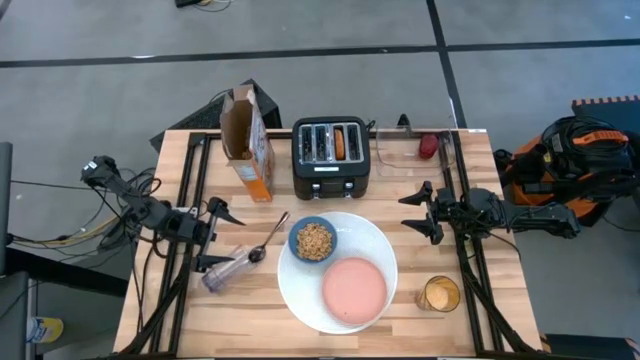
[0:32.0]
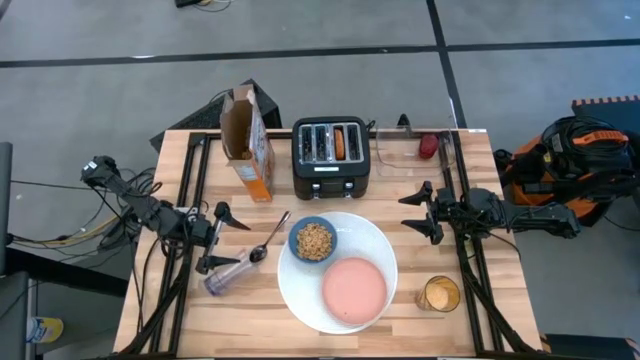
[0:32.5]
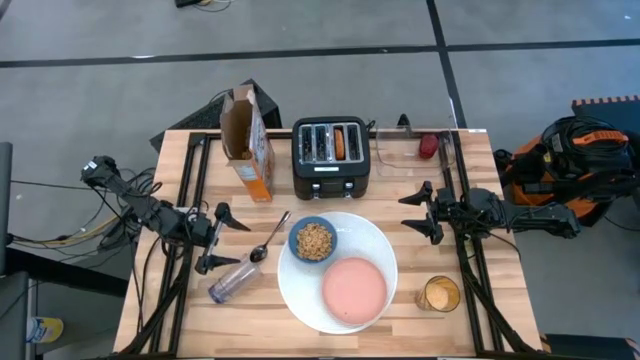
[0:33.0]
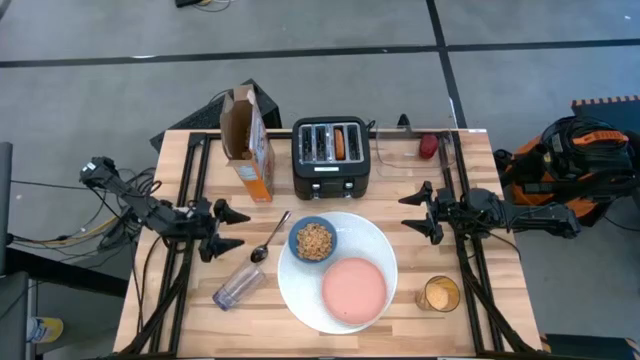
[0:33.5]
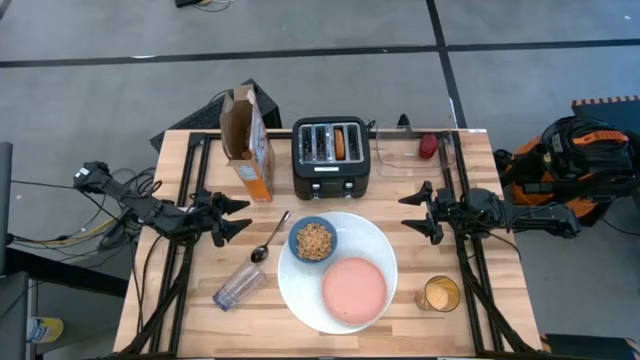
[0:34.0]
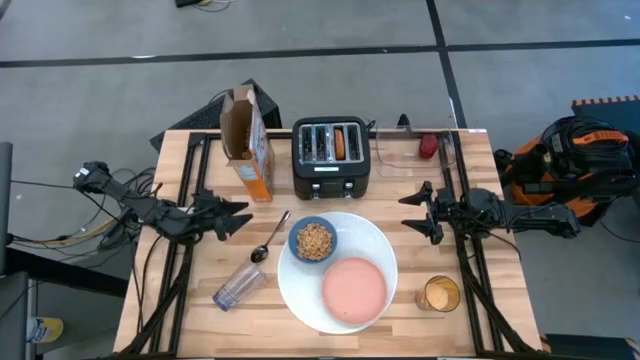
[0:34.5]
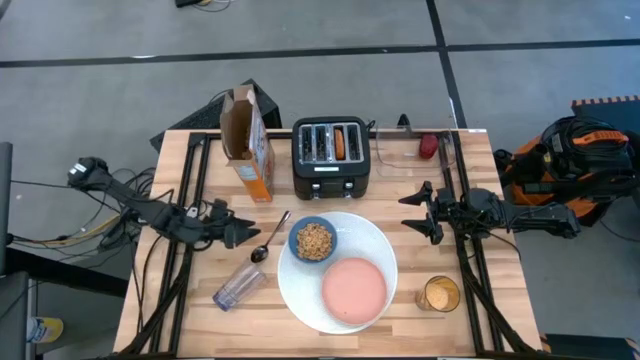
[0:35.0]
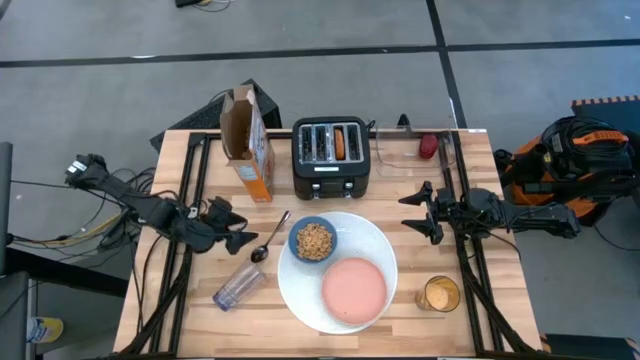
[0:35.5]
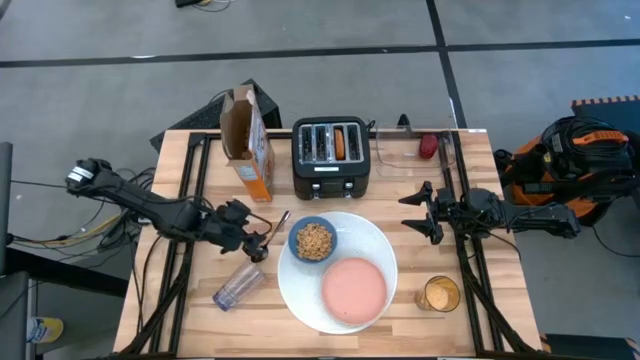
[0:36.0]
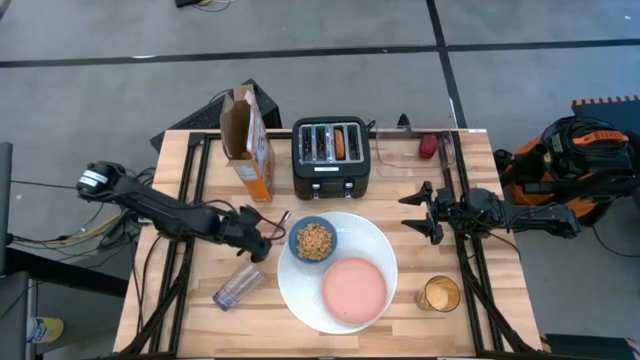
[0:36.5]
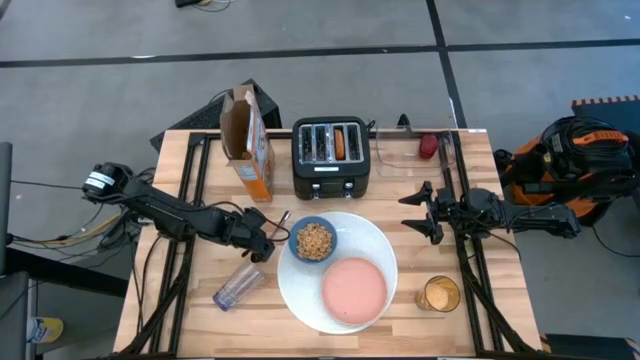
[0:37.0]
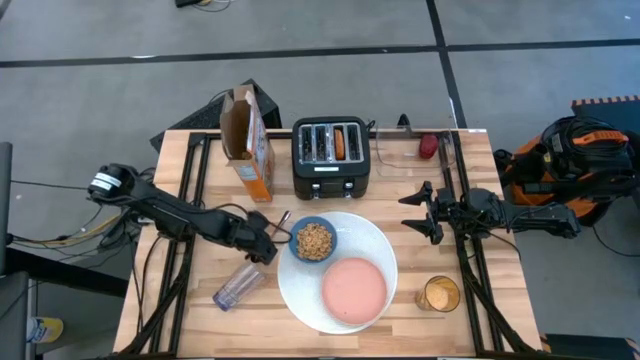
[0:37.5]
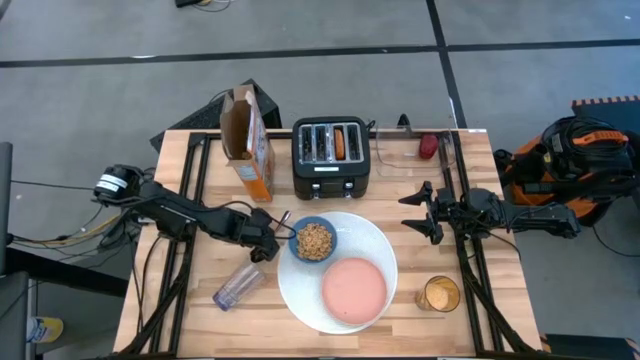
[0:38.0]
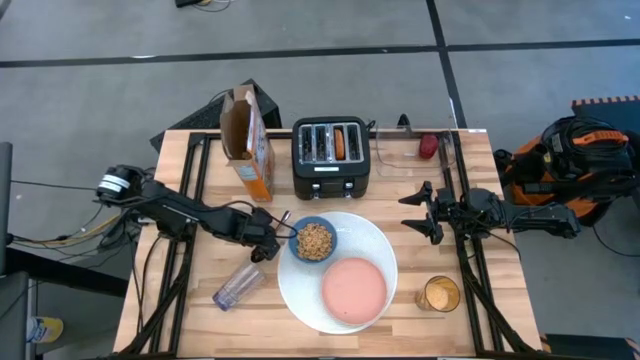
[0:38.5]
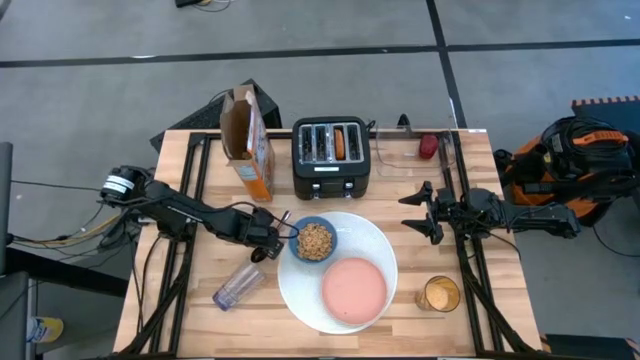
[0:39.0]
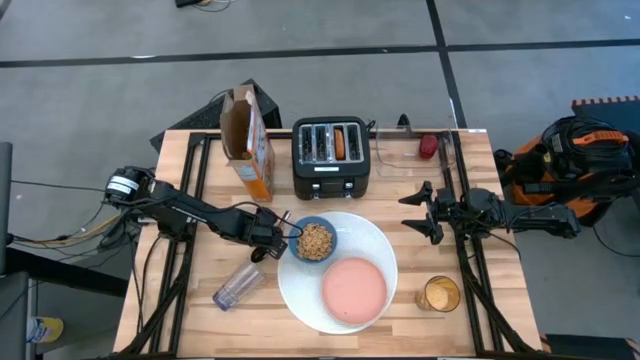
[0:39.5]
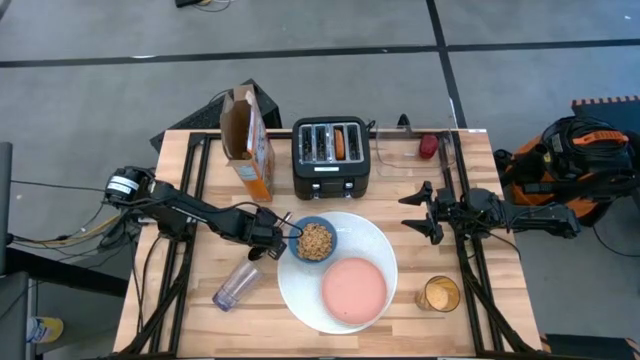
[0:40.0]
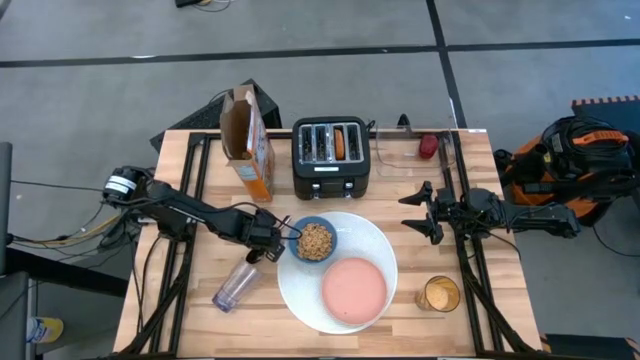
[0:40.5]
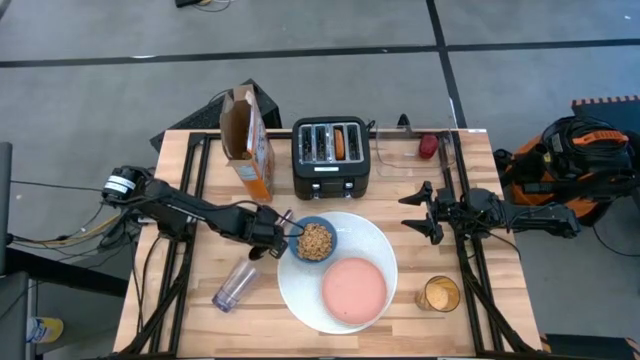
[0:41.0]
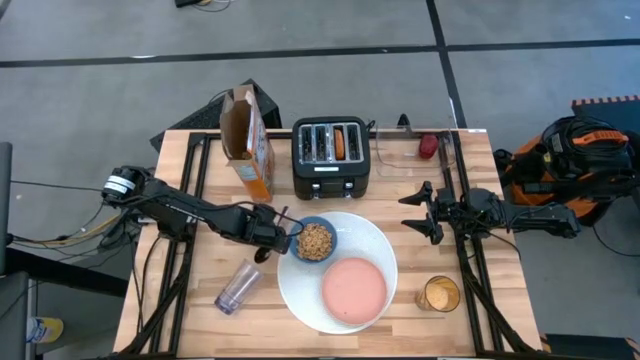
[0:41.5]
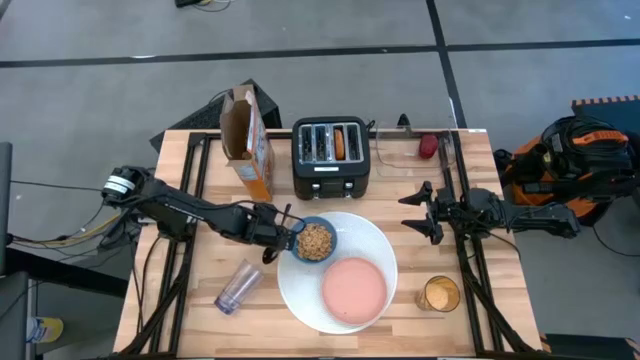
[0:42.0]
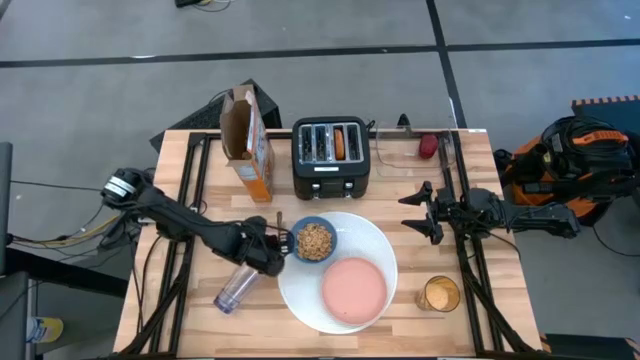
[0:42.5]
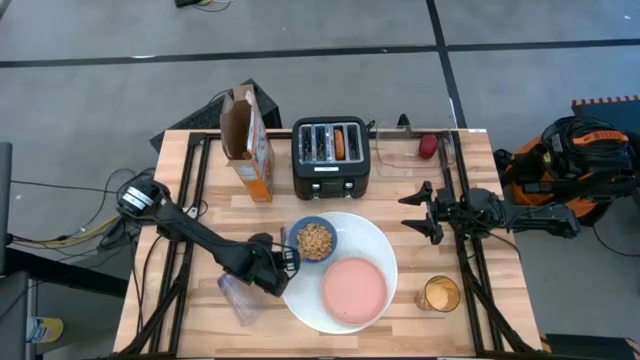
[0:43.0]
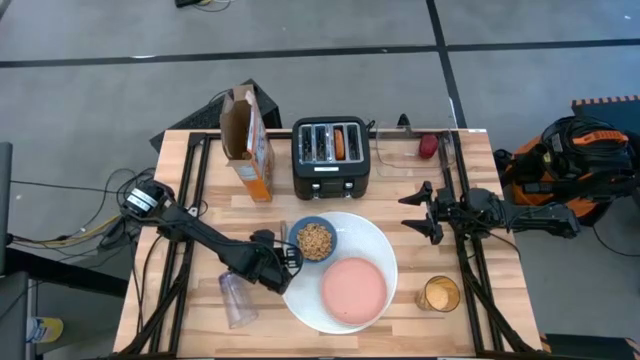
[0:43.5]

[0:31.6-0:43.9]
Task: Arrange a breakfast setting
Put the black spoon to the left of the blue bowl

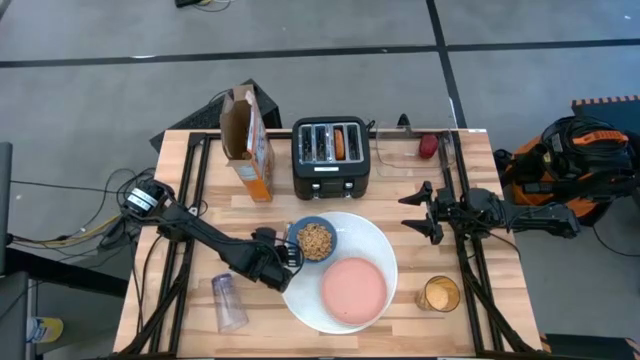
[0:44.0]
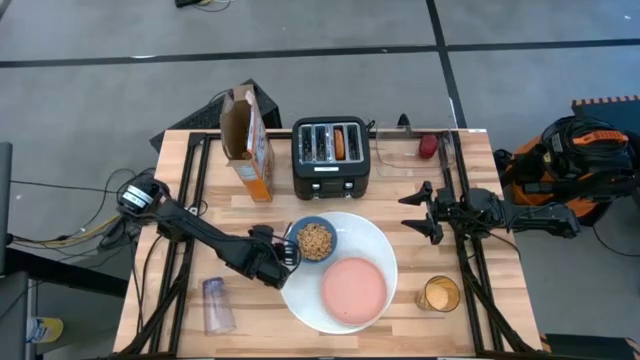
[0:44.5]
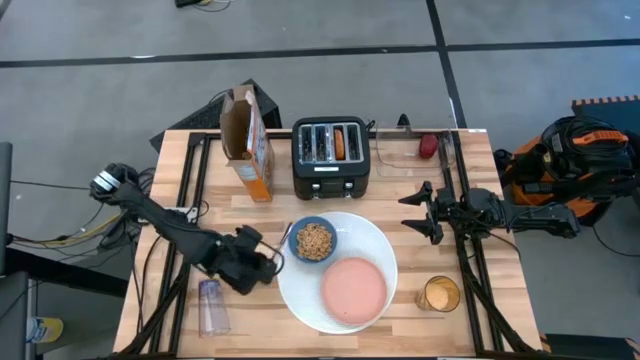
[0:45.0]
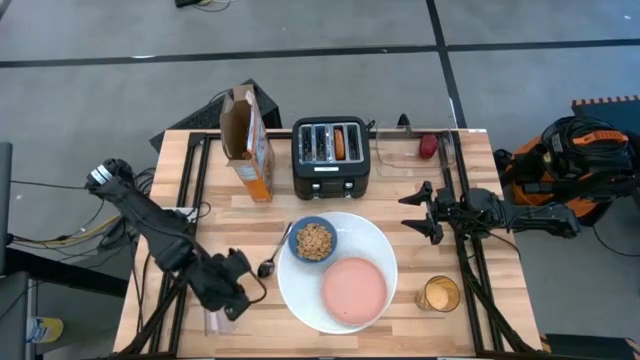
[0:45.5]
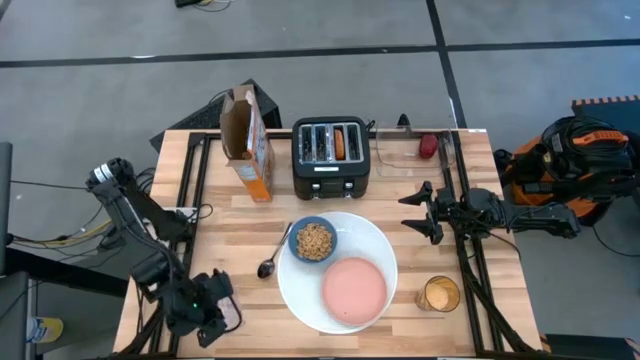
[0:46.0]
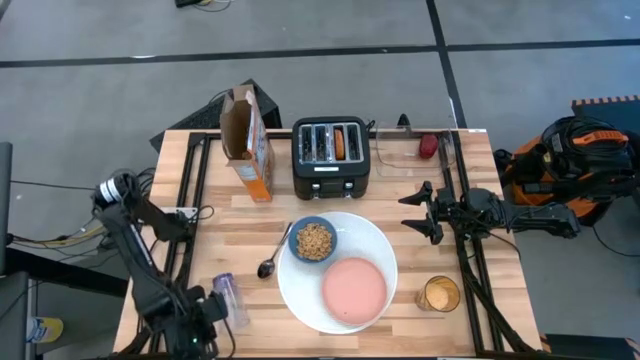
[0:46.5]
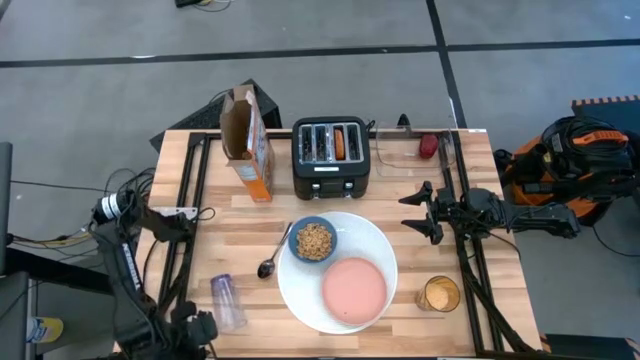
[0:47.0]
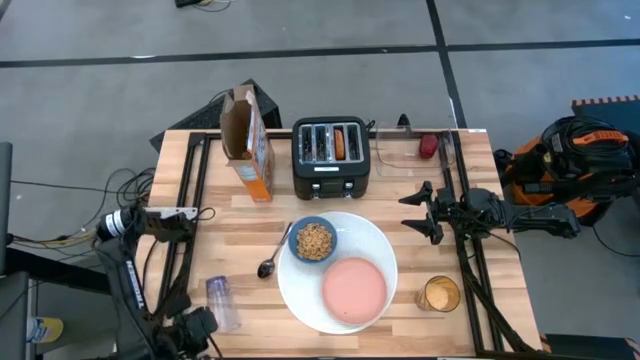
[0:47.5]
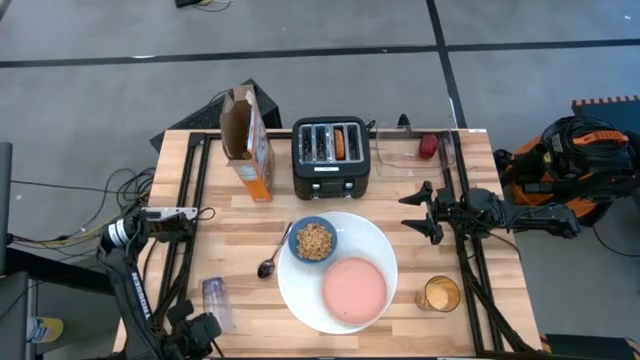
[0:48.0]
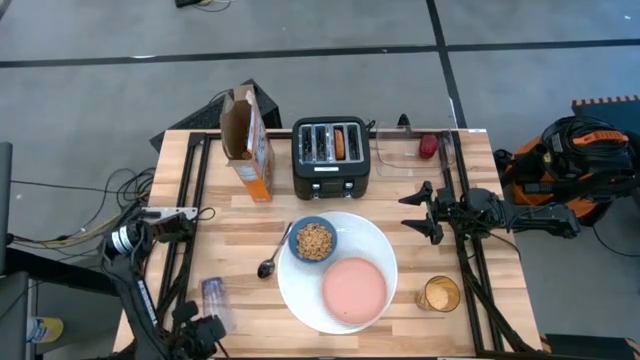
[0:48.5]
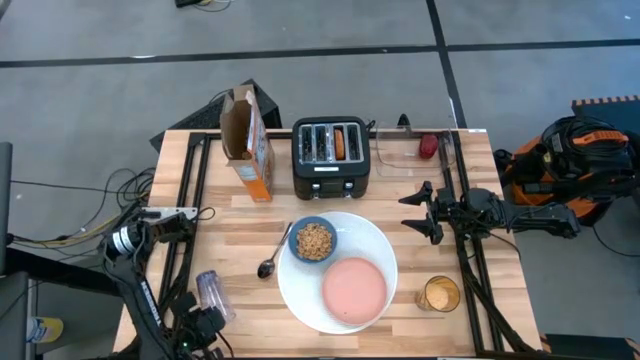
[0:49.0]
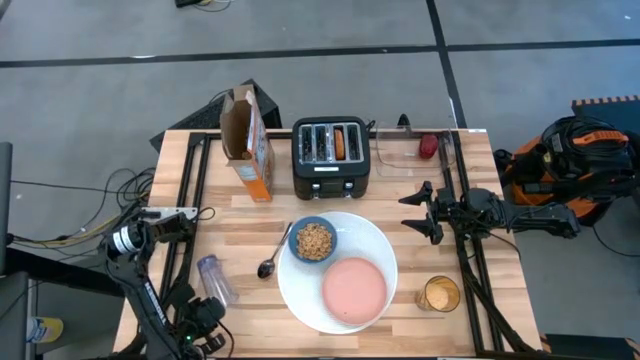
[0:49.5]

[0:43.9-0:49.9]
Put the purple cup on top of the white placemat

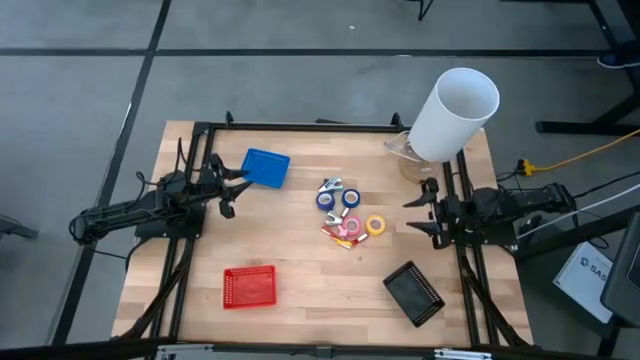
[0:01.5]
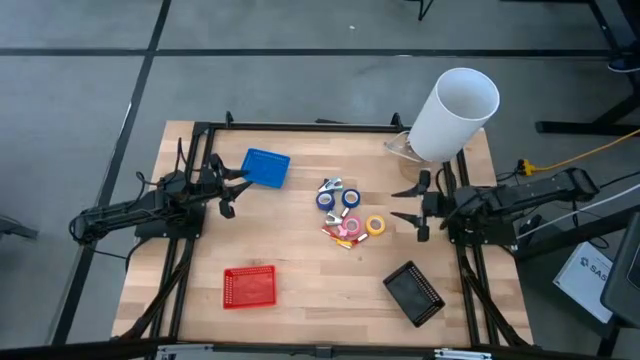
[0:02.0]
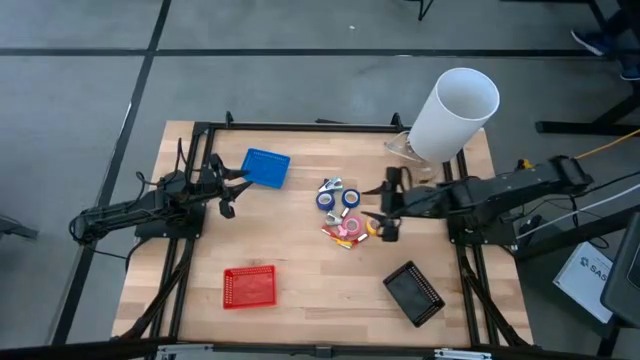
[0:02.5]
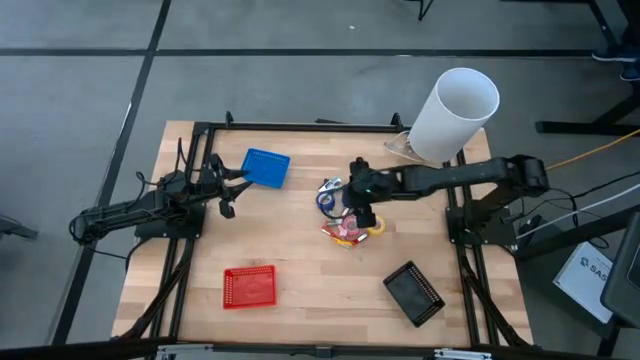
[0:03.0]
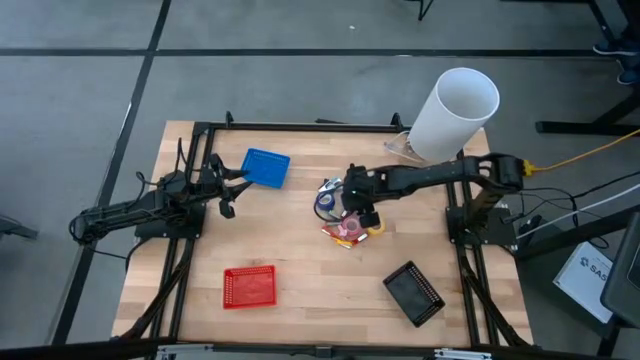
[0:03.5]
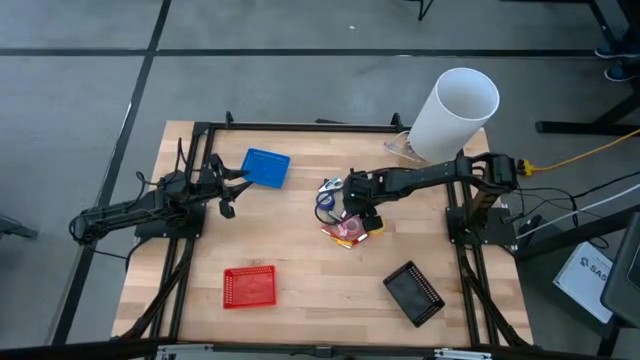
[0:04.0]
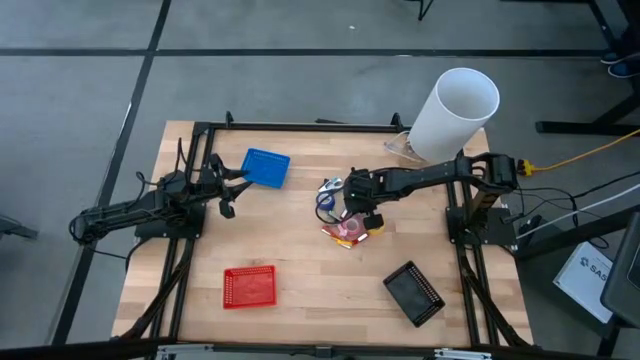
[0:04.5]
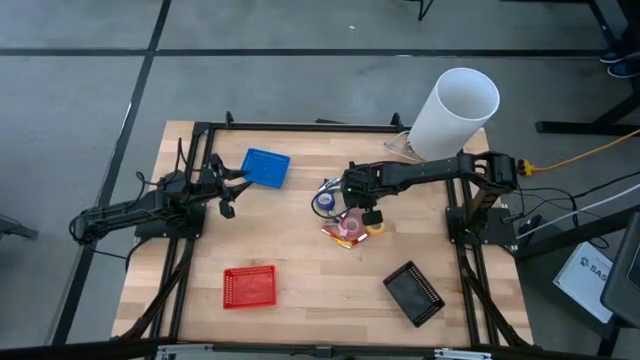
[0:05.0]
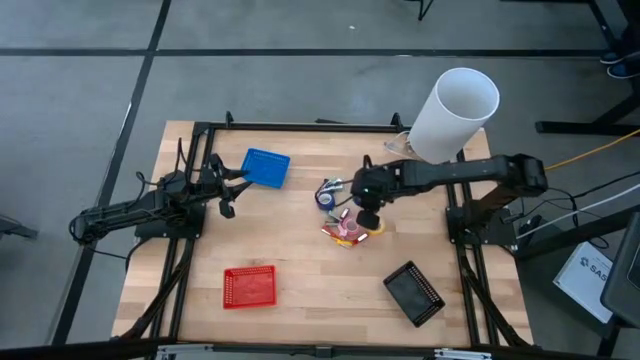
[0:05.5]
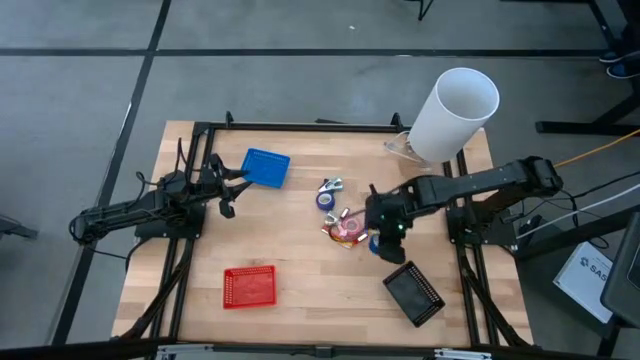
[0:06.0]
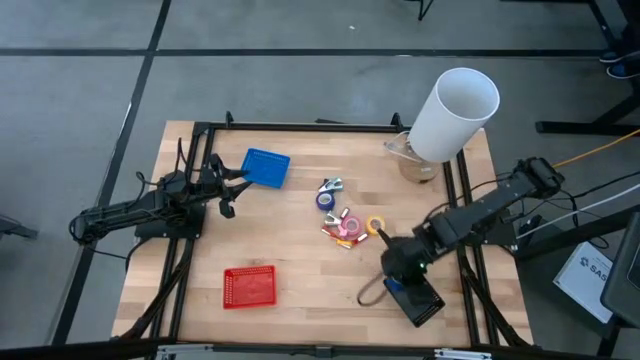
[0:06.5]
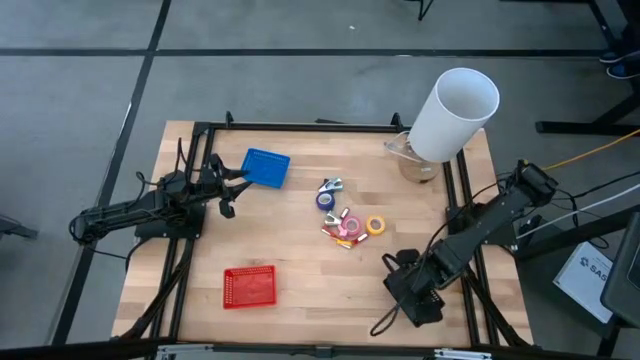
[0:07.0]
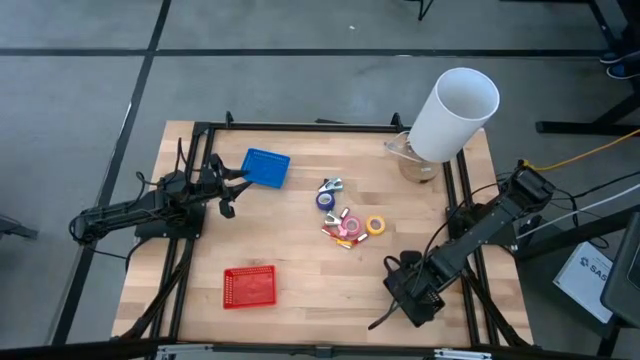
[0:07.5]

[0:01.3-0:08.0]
Task: Pick and place Stapler, Stapler remover, tape
Put the blue tape into the black bin
